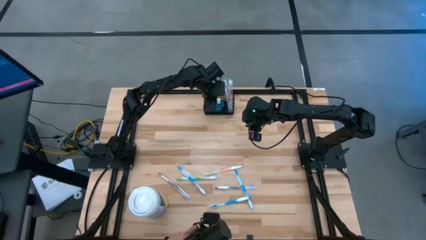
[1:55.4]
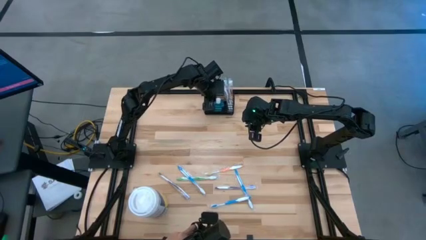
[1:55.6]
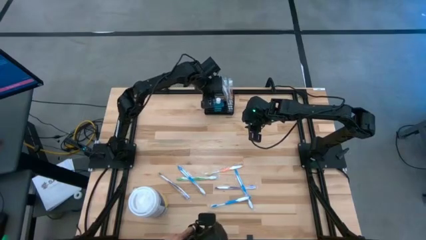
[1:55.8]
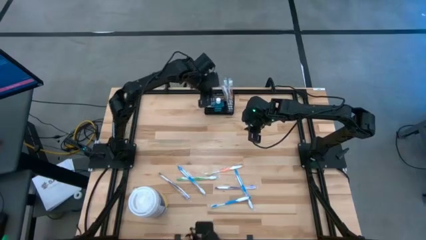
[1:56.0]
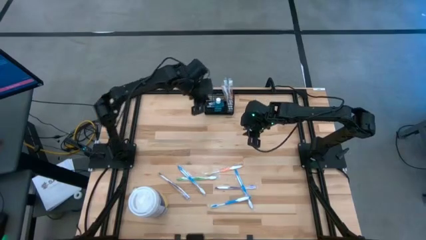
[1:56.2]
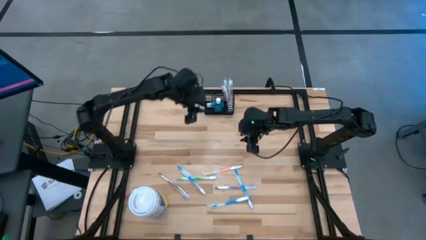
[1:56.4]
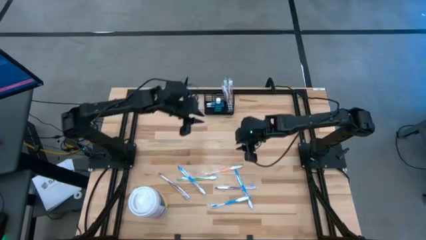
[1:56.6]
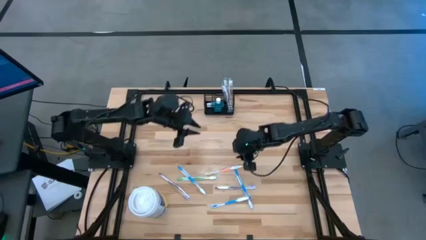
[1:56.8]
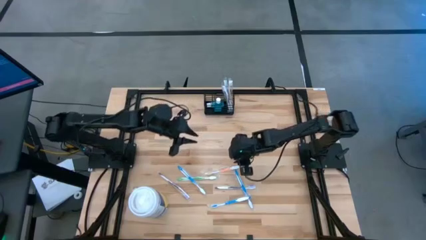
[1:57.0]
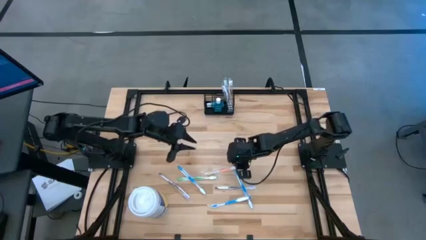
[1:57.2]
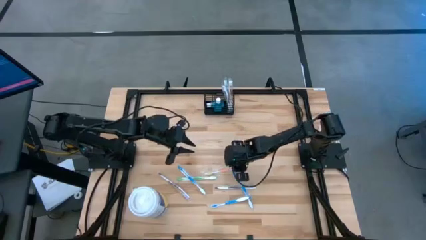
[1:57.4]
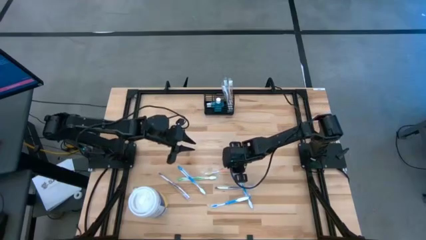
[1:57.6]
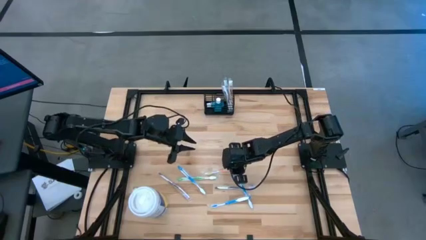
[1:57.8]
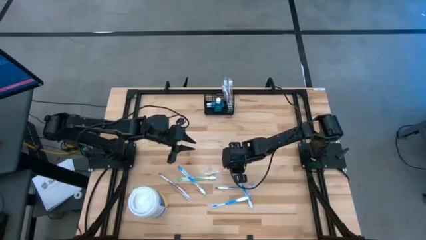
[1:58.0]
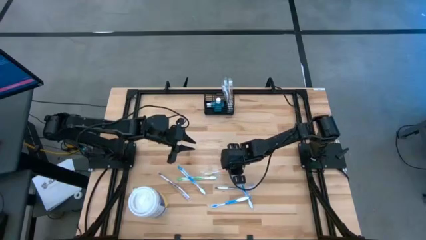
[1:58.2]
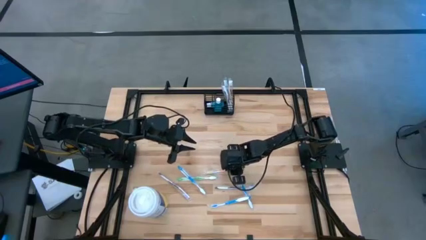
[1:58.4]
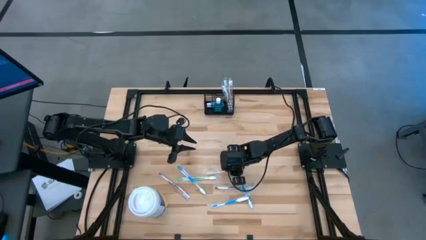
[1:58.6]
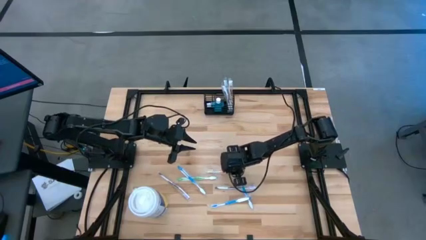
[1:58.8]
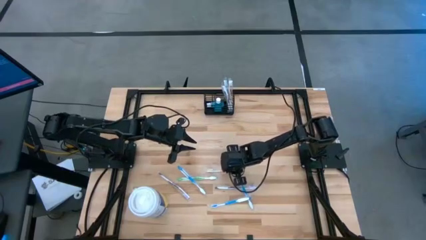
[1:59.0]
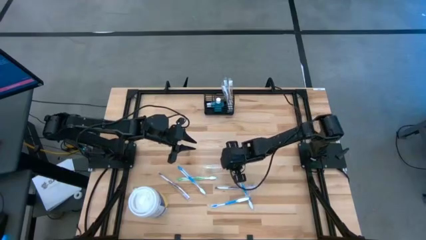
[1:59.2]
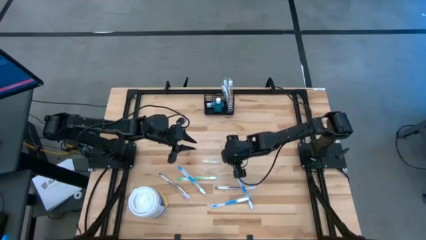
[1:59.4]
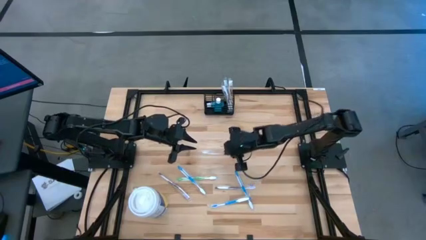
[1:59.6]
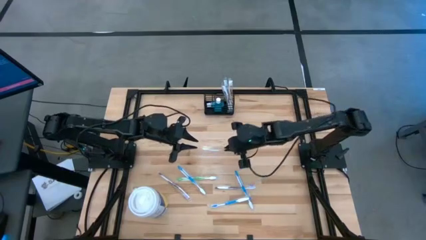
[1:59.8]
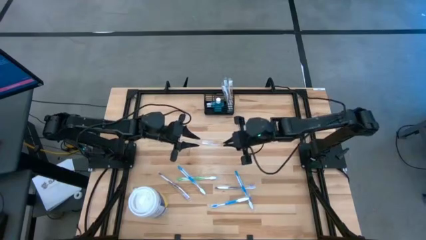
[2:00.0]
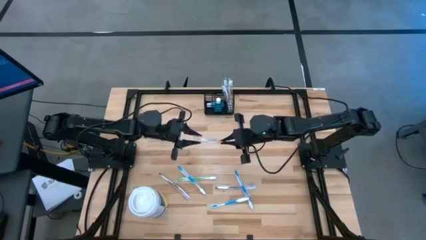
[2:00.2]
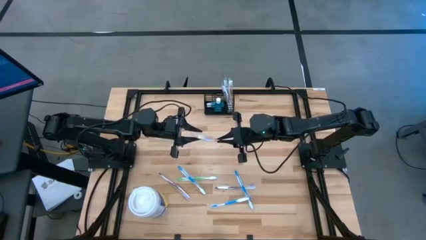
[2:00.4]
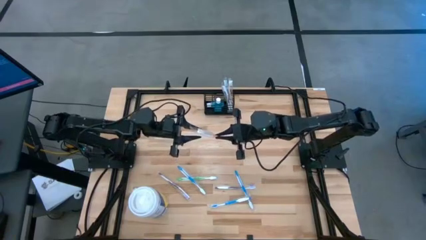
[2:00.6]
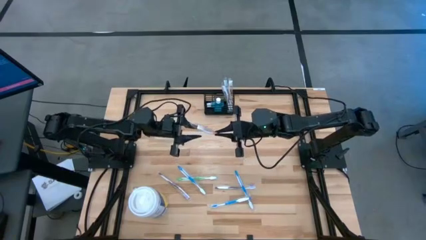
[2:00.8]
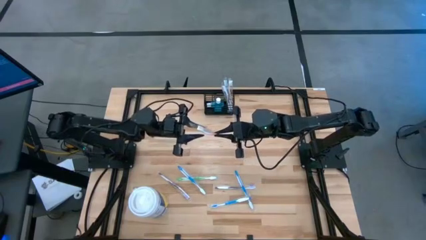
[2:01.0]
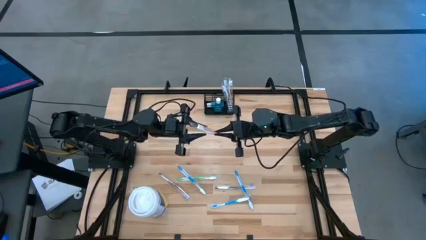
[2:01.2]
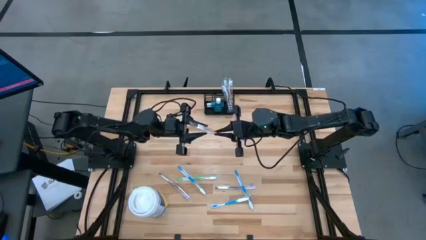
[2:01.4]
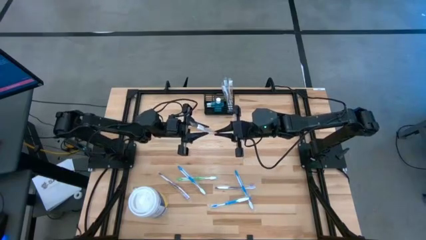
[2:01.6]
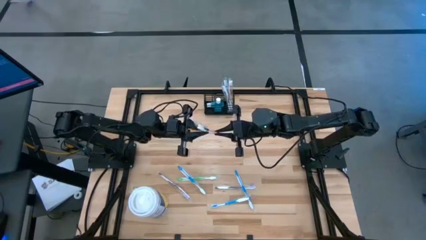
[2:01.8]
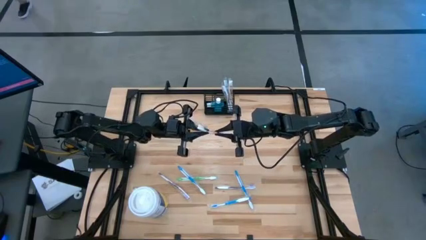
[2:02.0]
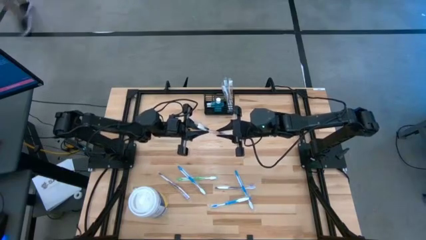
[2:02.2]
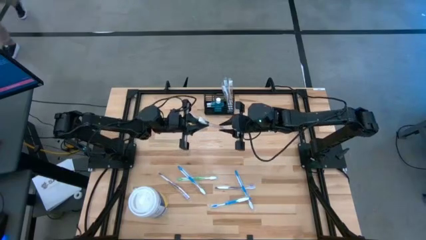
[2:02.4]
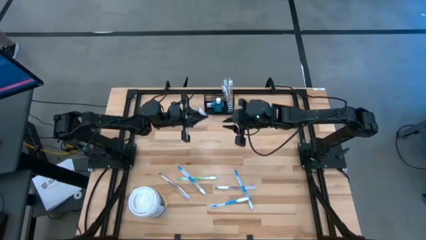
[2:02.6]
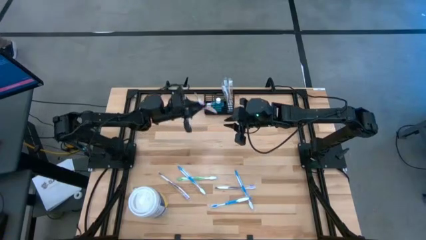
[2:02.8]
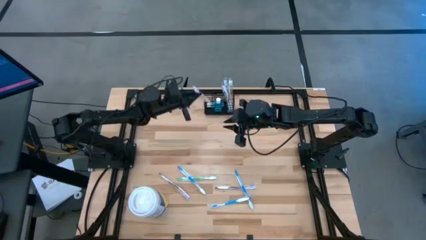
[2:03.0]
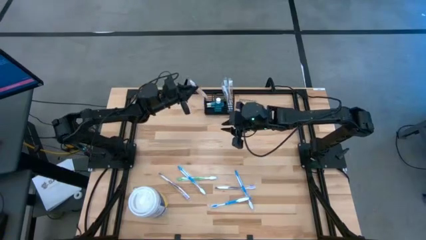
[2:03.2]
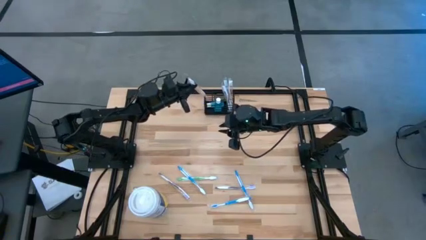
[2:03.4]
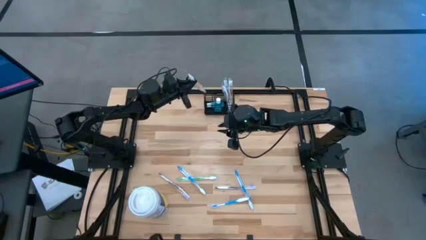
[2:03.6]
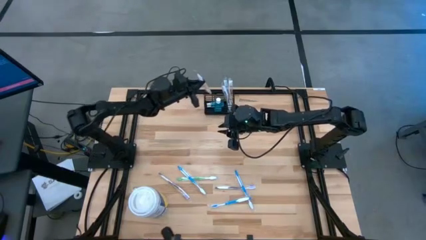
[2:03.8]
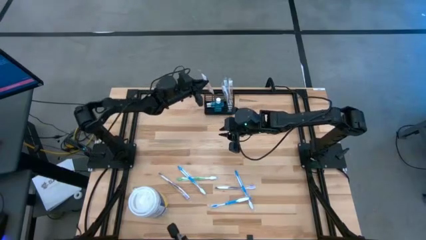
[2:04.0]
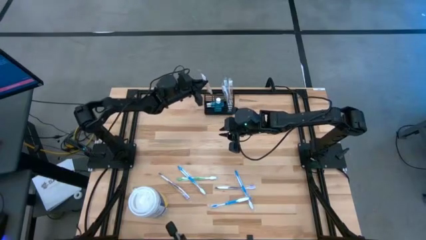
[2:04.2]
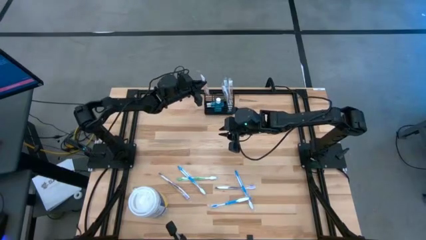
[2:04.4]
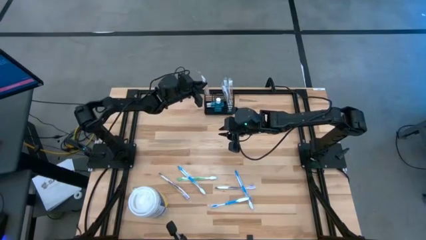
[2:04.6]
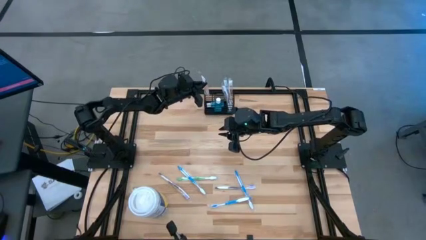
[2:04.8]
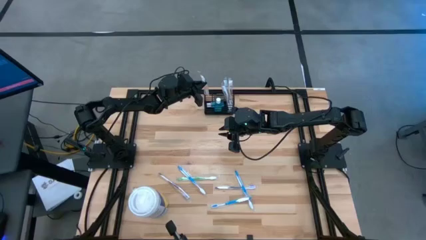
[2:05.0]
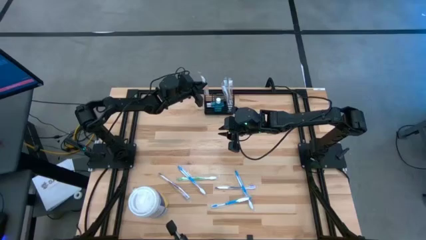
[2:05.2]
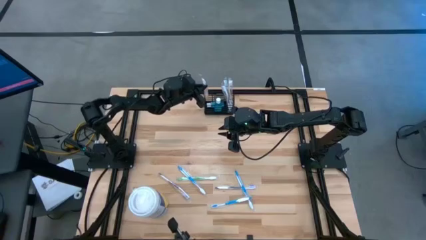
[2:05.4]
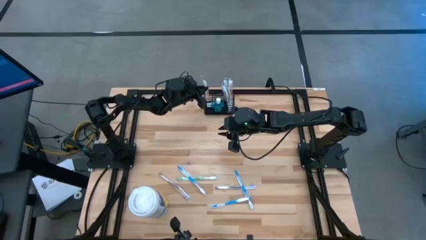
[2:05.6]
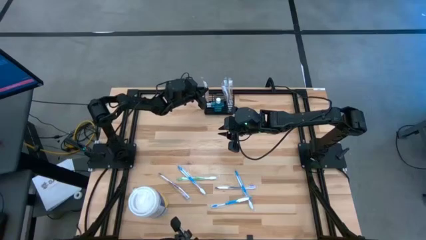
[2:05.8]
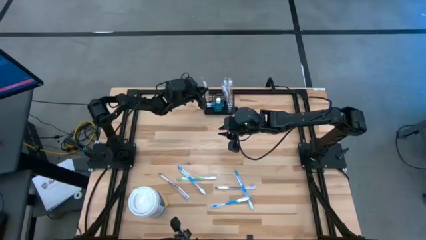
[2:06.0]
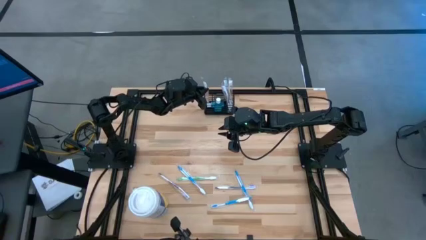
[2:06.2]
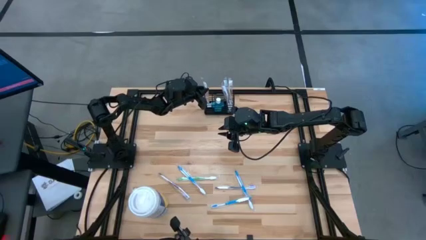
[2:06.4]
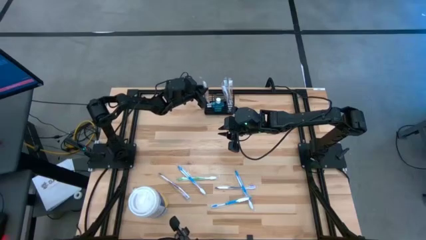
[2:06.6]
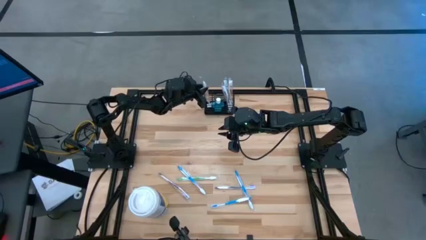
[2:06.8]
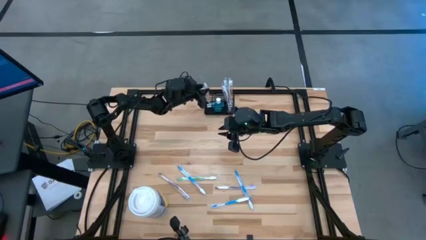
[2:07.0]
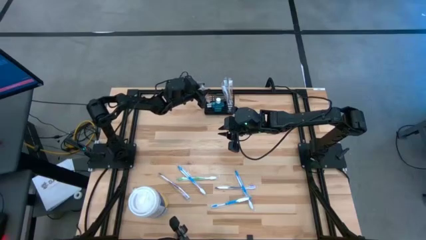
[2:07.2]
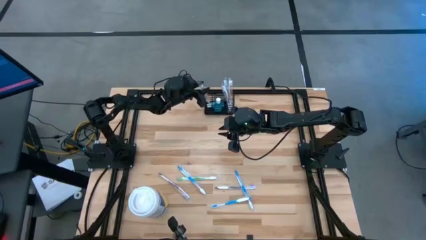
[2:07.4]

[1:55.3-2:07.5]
Task: Pick & Place toothbrushing station
Put the toothbrush into the mesh organizer

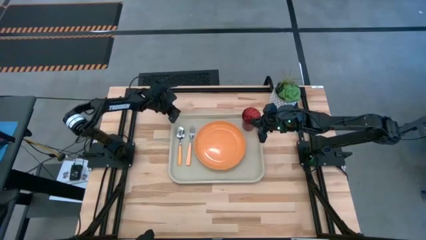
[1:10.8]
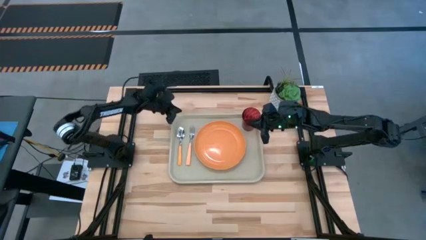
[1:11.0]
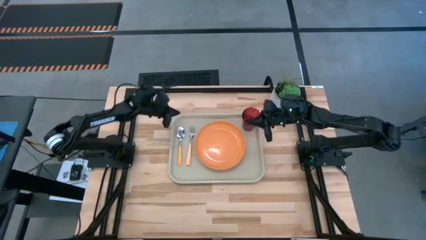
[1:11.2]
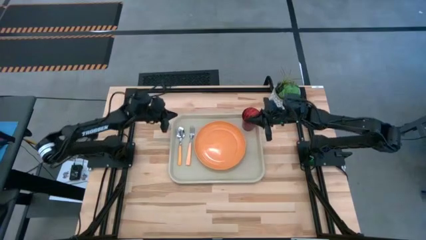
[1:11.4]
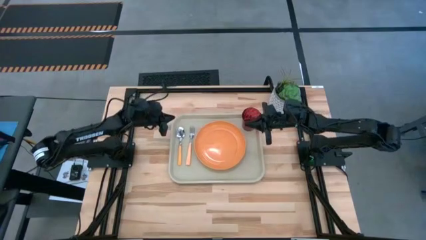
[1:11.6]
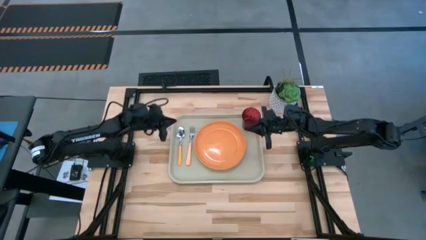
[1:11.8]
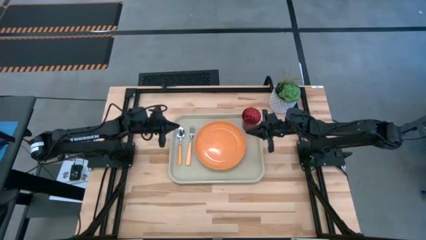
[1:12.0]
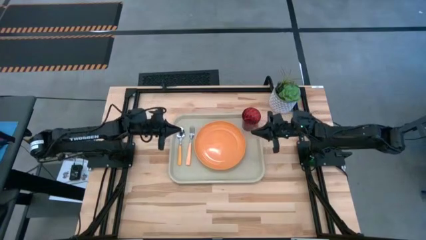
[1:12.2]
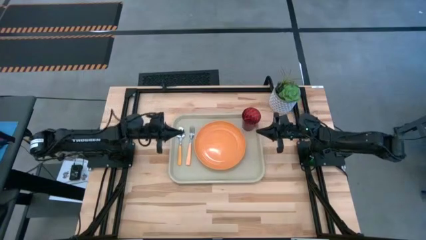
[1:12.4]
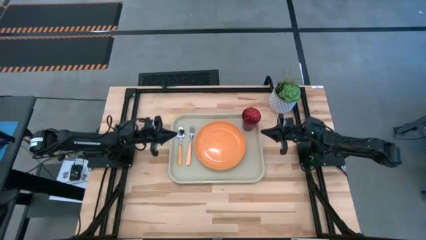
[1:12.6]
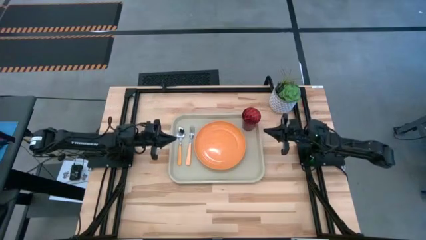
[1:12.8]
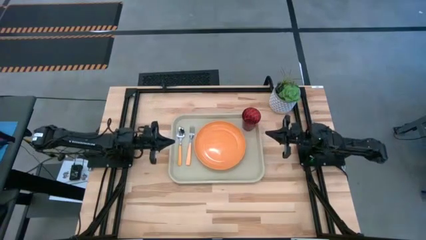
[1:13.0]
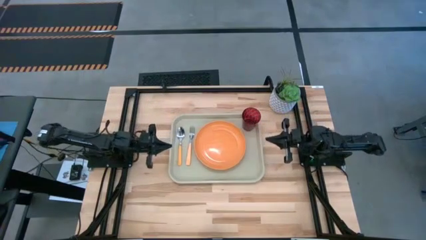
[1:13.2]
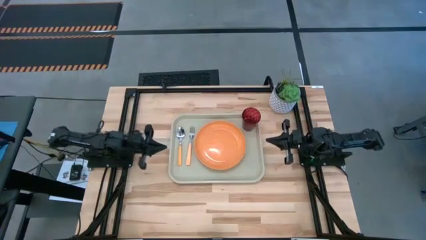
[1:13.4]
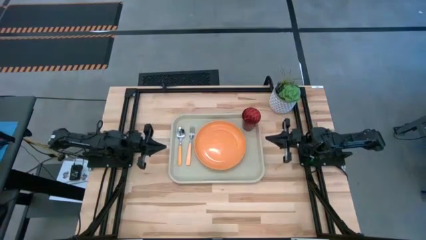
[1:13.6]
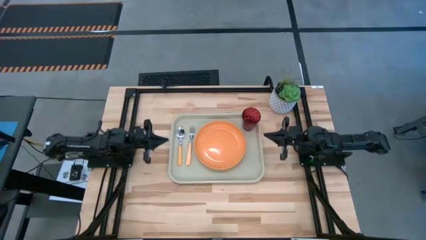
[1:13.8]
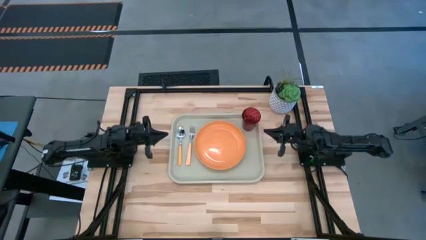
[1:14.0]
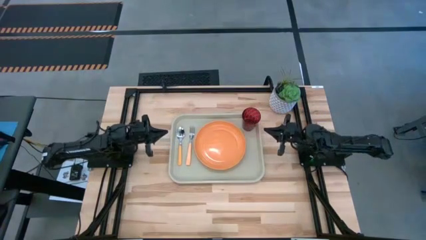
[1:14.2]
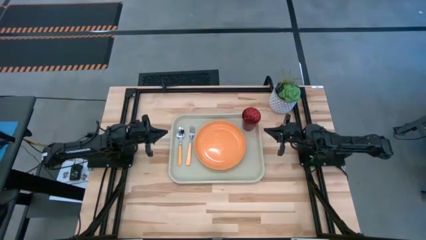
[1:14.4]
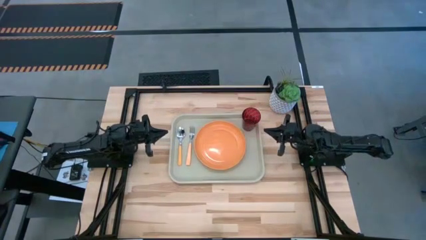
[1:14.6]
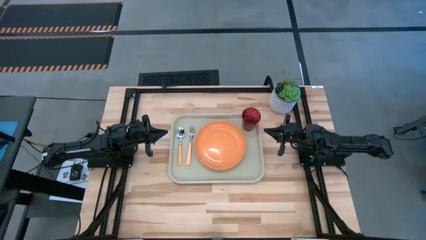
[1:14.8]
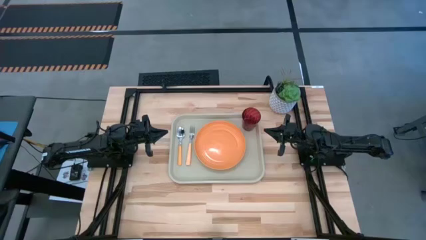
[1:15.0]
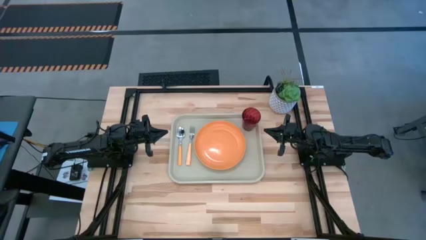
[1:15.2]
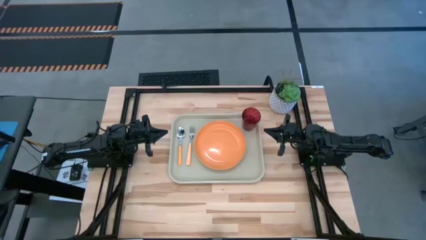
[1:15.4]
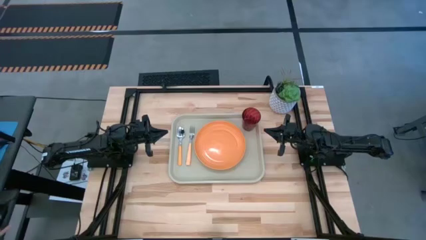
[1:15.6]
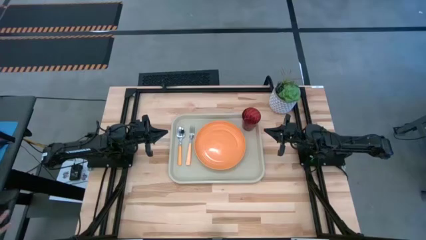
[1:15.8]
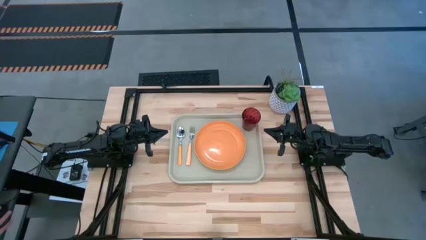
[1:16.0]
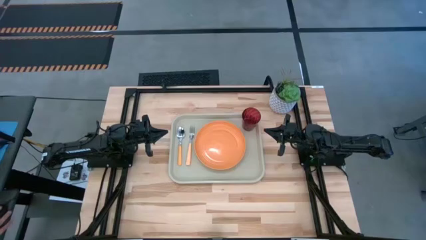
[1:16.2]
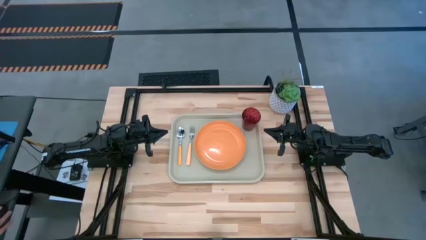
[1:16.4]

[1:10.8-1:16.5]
Task: Pick and place plate/cup/fork/spoon on tray
Return to Home Position
